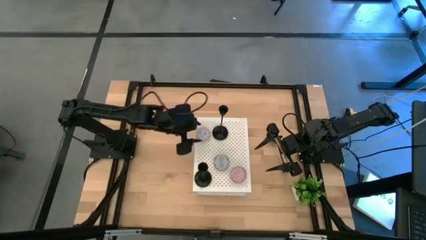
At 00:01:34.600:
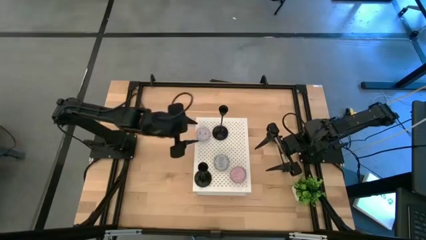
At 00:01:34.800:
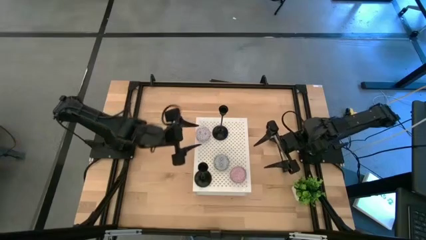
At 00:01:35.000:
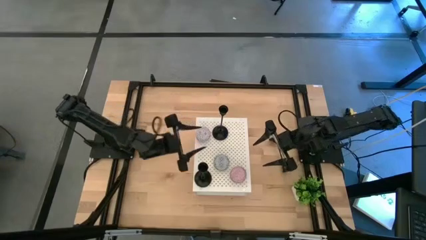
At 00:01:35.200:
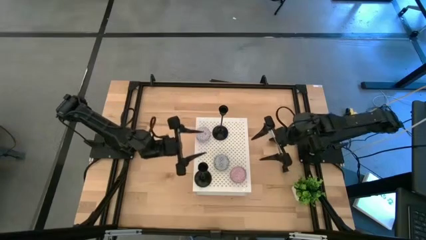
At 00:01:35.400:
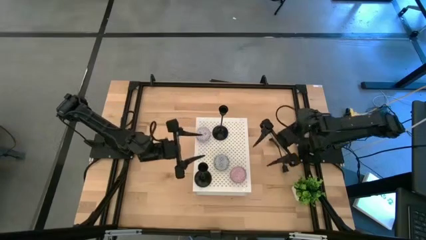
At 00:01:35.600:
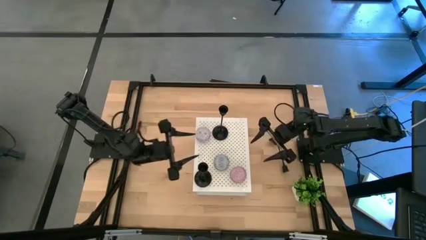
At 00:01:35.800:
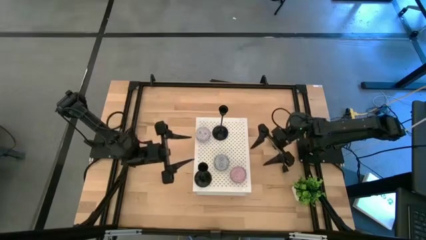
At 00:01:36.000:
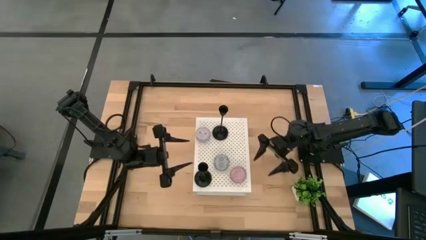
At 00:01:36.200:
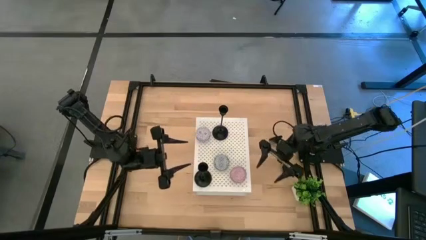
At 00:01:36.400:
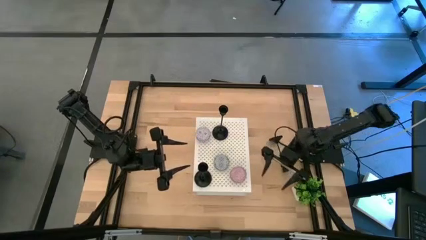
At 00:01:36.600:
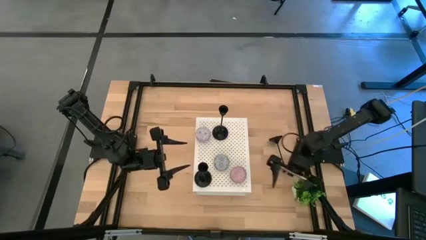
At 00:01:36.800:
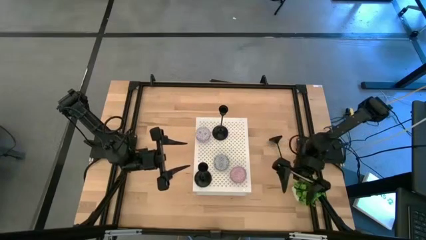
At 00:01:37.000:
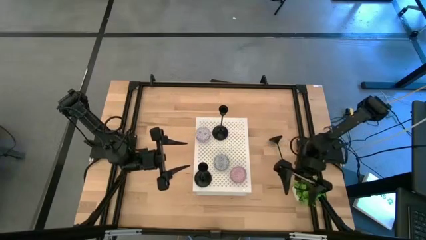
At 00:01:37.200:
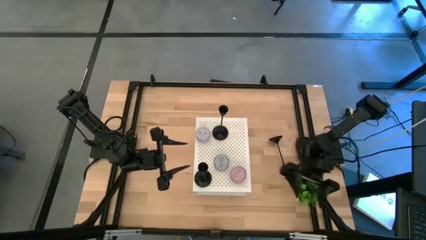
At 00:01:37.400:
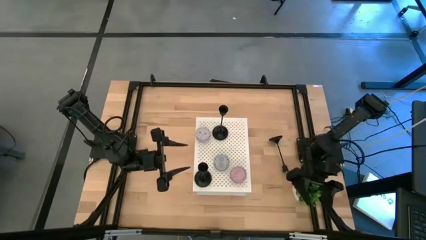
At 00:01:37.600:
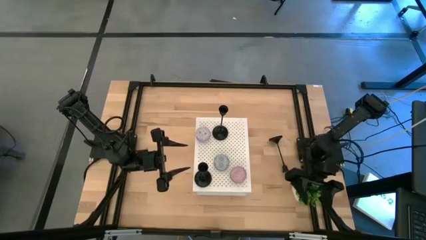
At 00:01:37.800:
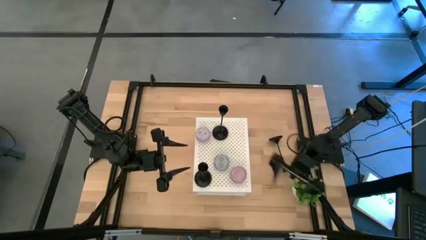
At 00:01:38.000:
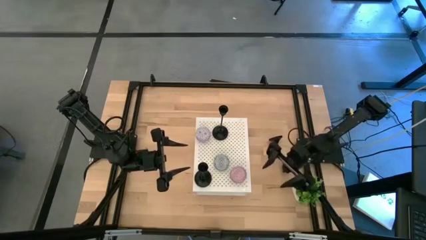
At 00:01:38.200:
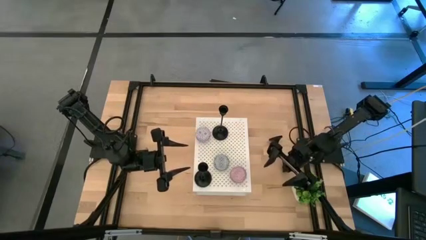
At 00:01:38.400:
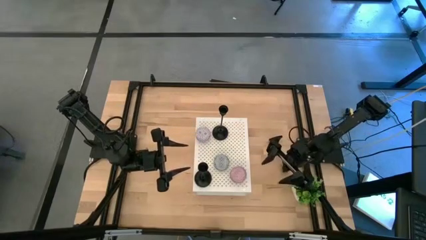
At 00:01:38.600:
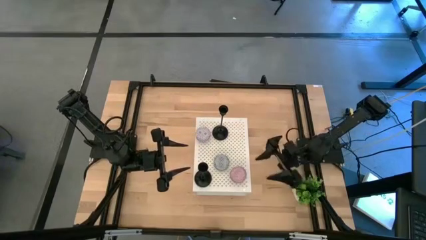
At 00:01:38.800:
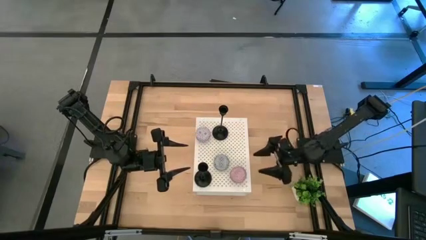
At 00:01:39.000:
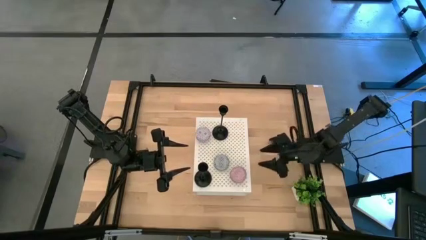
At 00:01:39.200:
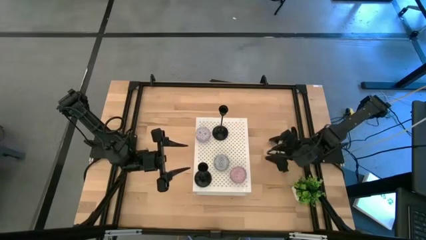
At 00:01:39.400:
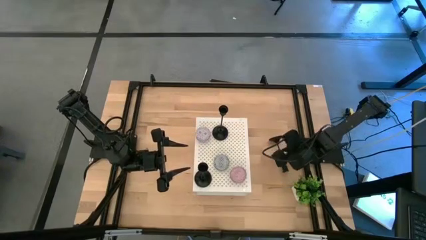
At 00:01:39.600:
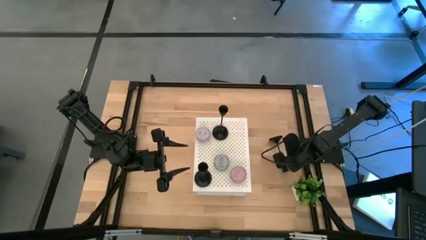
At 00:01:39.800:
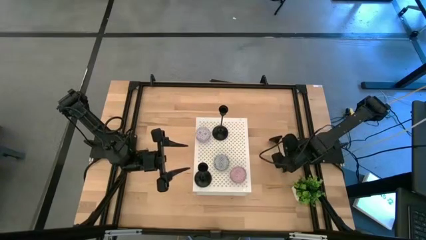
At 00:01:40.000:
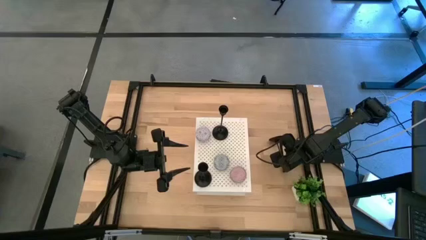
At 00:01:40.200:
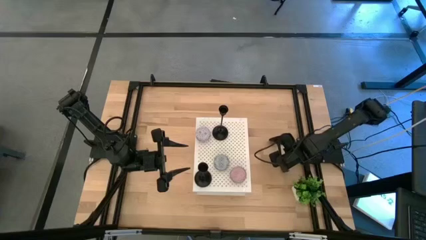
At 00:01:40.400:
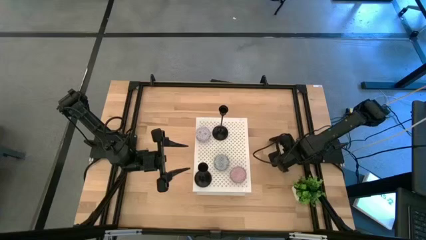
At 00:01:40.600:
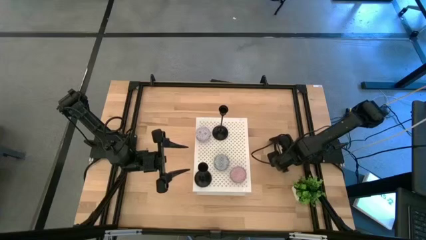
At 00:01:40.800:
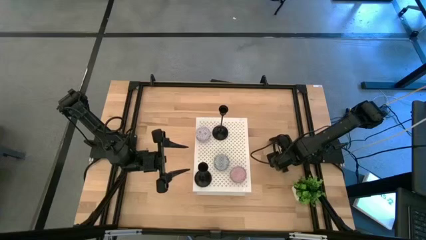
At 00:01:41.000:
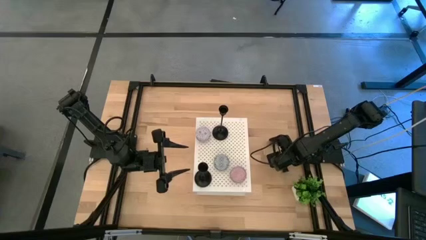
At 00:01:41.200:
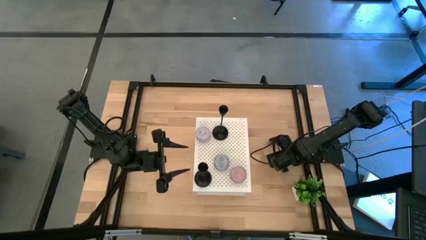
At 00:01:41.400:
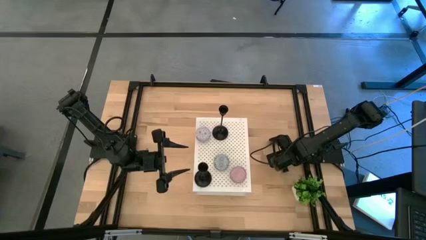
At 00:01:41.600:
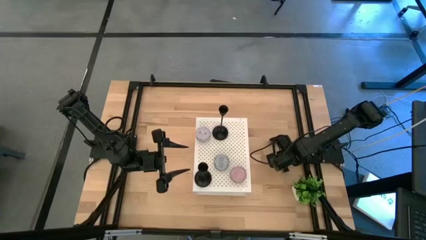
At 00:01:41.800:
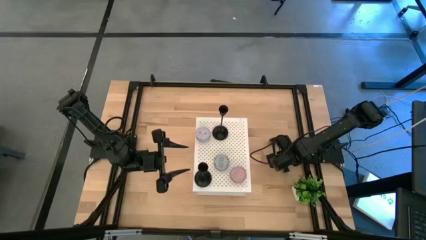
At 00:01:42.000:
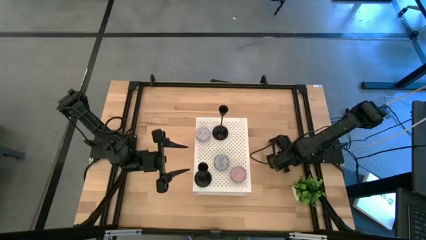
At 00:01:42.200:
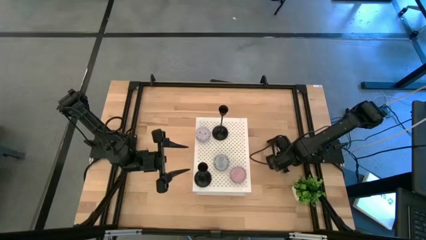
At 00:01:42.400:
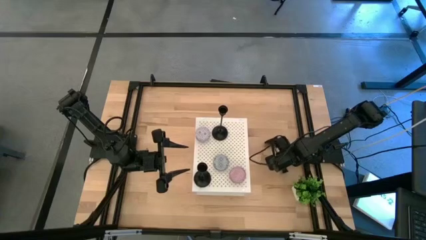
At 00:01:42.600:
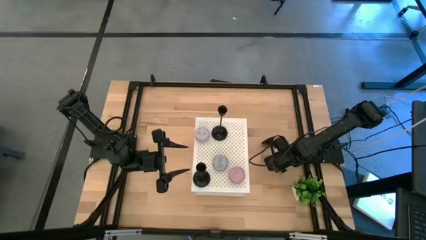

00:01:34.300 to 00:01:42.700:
Task: Pick & Place candle stick holders
Put the candle holder on the shelf
